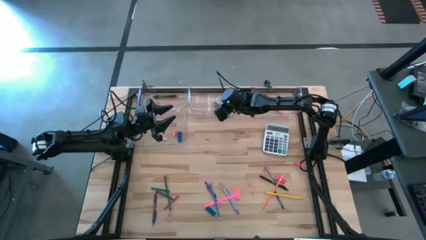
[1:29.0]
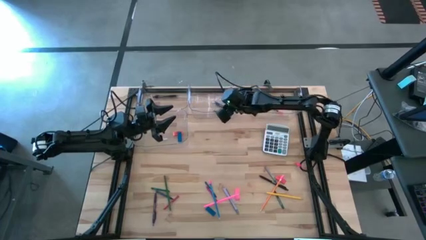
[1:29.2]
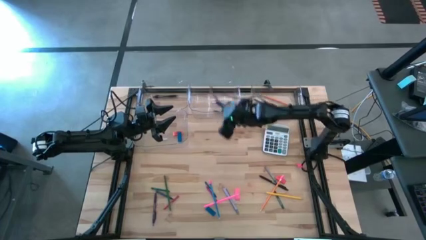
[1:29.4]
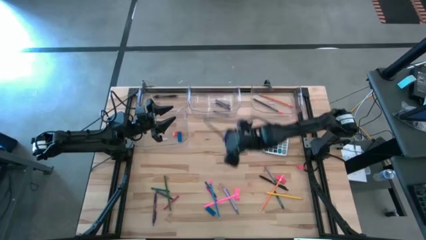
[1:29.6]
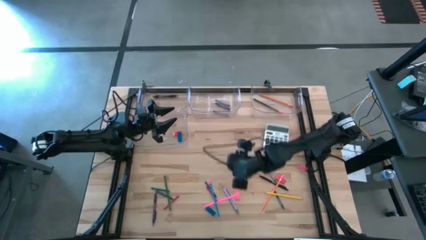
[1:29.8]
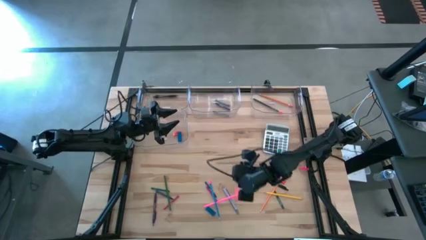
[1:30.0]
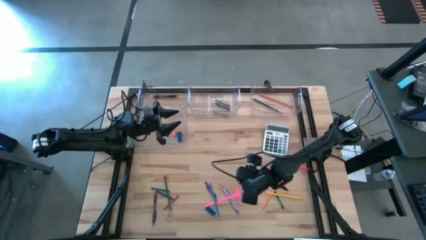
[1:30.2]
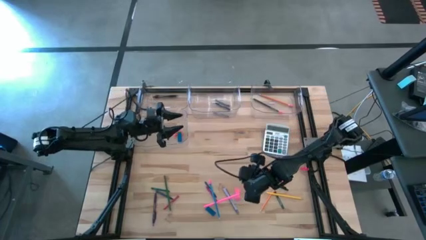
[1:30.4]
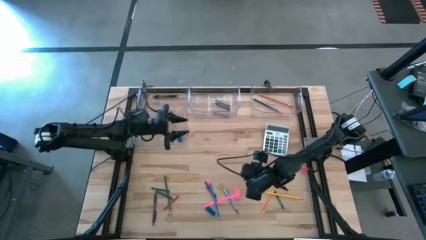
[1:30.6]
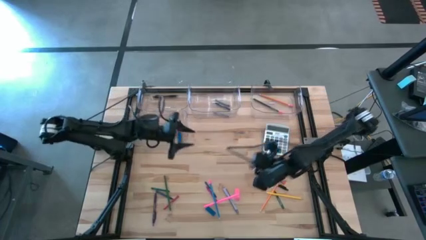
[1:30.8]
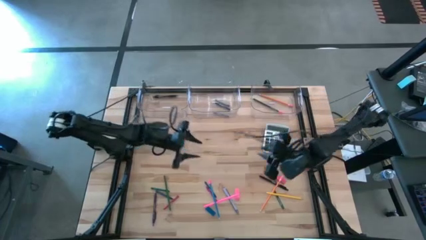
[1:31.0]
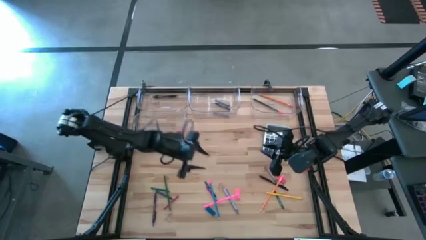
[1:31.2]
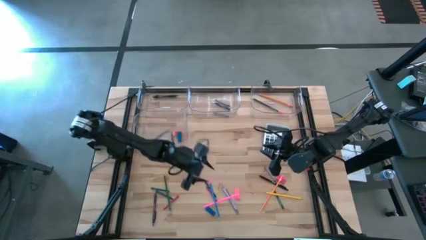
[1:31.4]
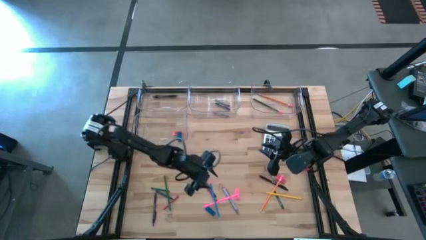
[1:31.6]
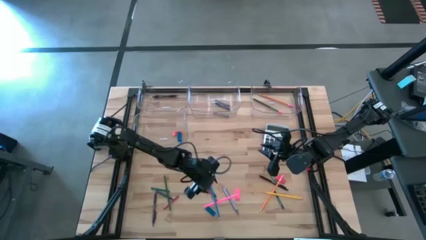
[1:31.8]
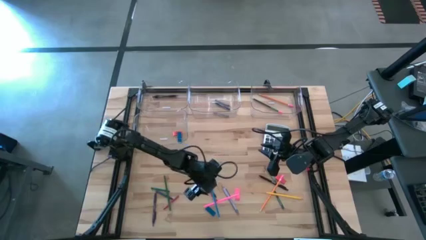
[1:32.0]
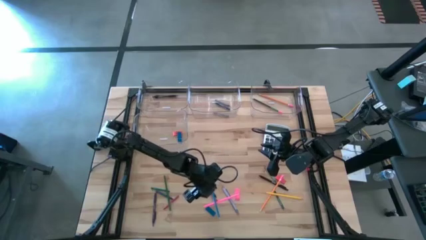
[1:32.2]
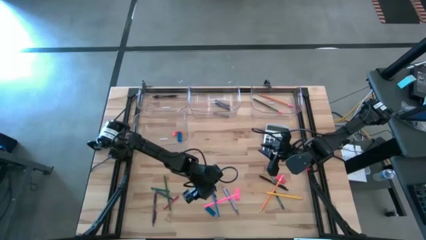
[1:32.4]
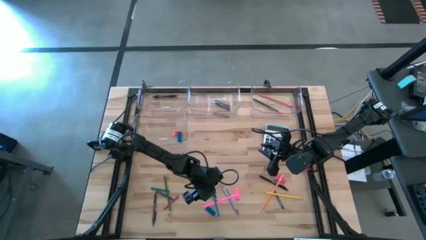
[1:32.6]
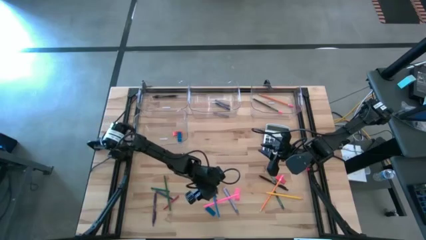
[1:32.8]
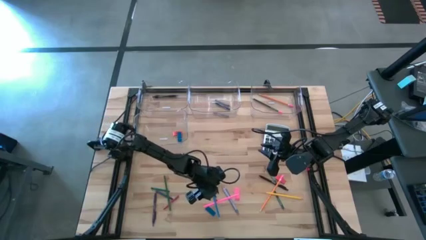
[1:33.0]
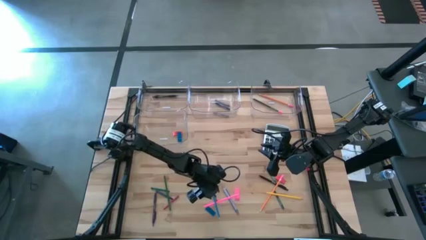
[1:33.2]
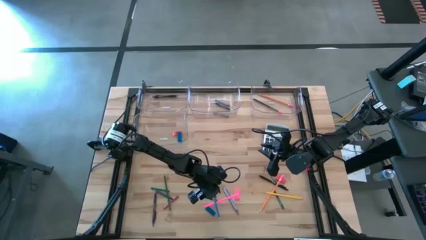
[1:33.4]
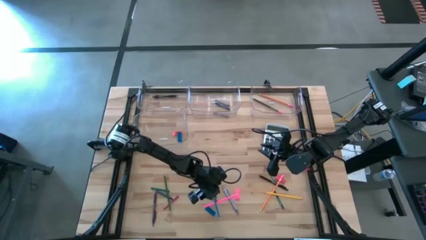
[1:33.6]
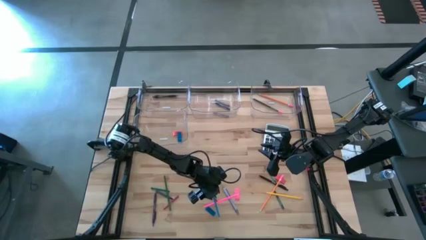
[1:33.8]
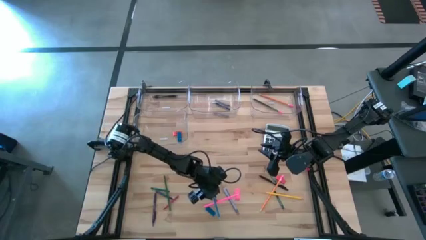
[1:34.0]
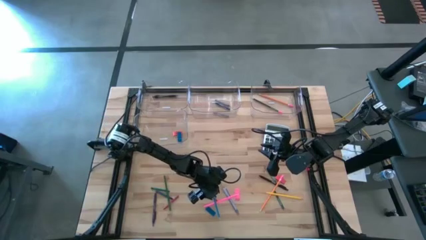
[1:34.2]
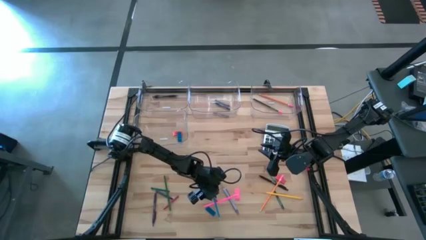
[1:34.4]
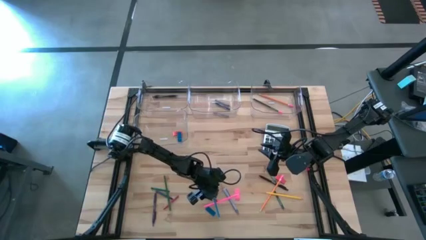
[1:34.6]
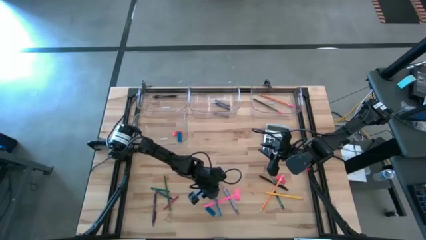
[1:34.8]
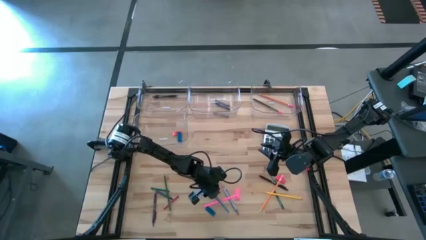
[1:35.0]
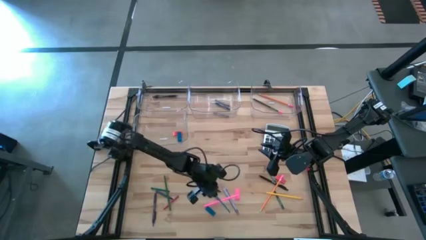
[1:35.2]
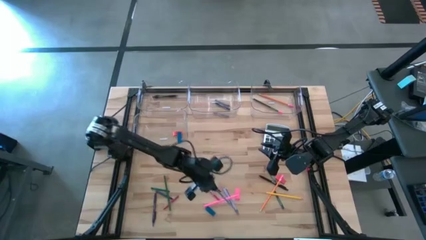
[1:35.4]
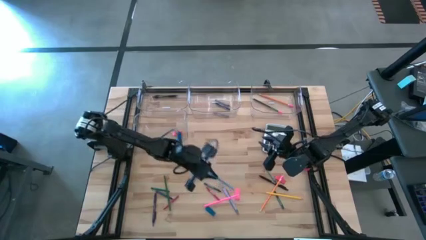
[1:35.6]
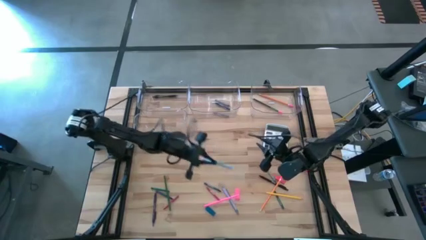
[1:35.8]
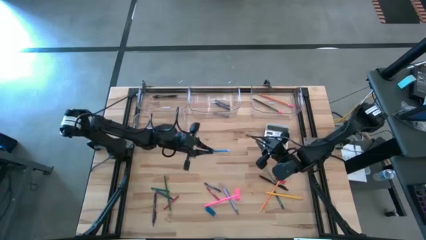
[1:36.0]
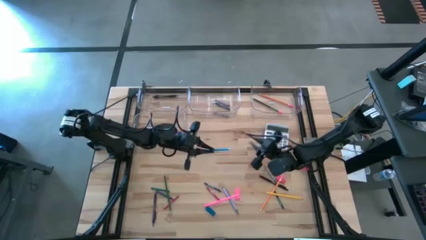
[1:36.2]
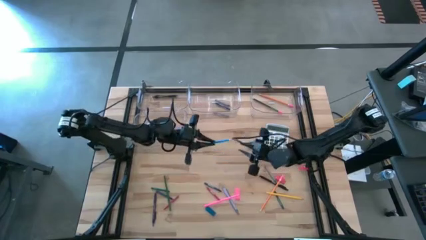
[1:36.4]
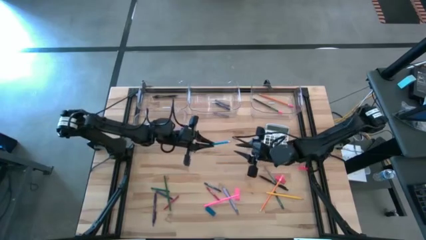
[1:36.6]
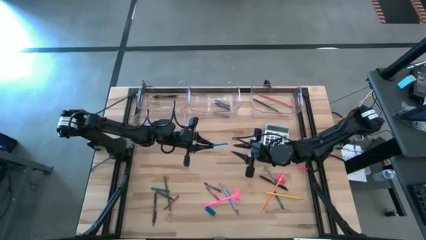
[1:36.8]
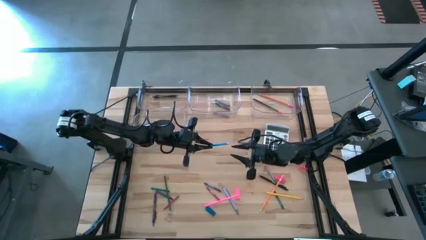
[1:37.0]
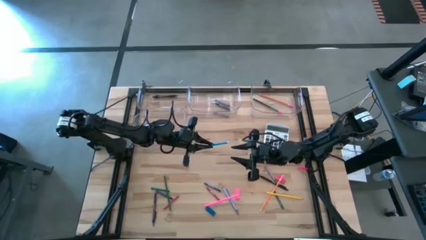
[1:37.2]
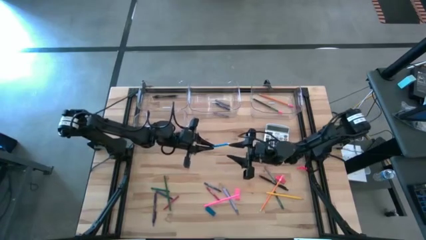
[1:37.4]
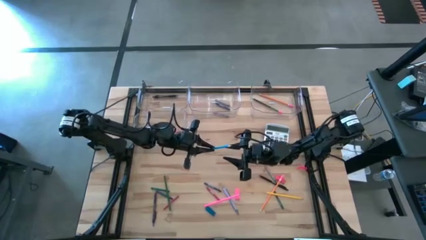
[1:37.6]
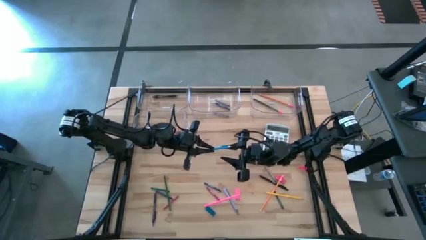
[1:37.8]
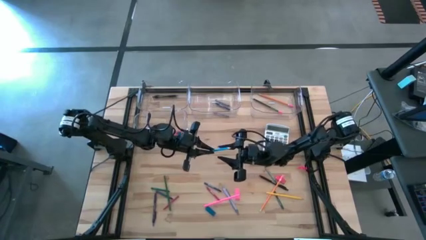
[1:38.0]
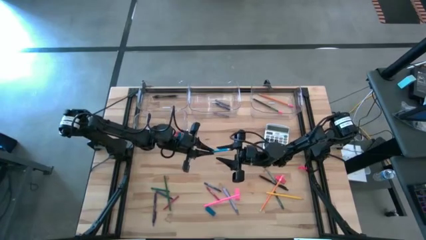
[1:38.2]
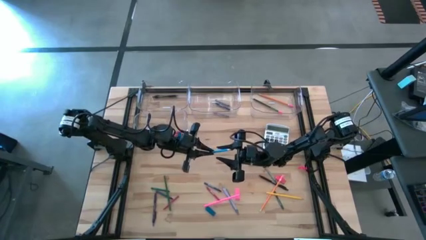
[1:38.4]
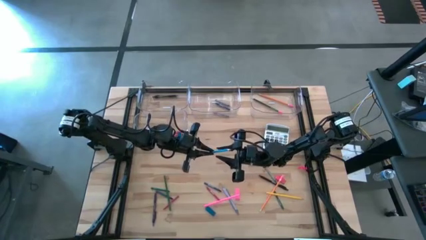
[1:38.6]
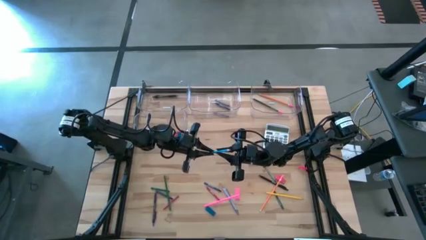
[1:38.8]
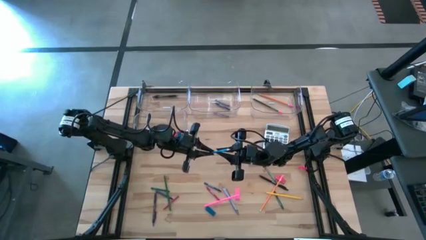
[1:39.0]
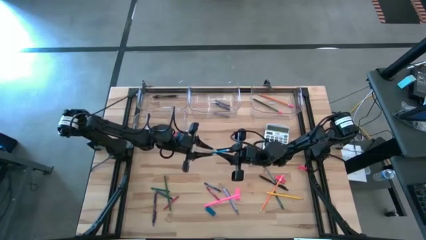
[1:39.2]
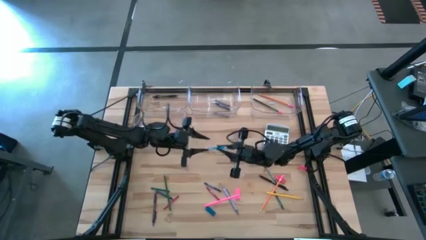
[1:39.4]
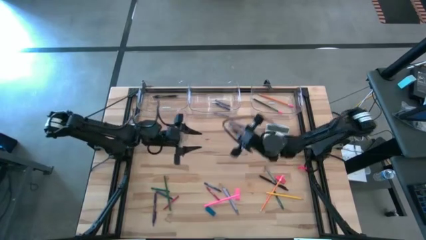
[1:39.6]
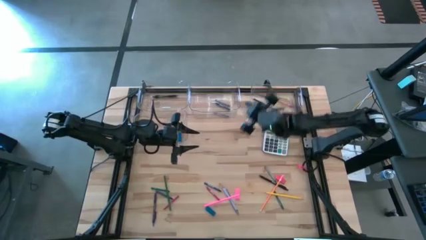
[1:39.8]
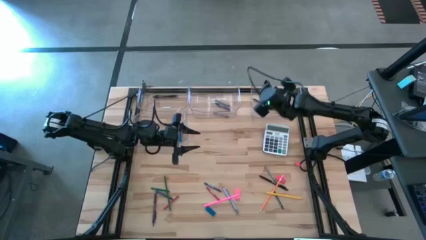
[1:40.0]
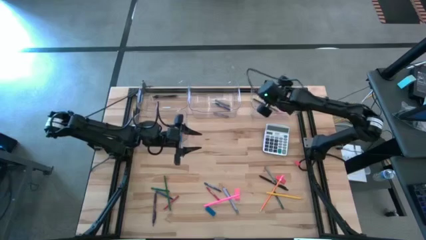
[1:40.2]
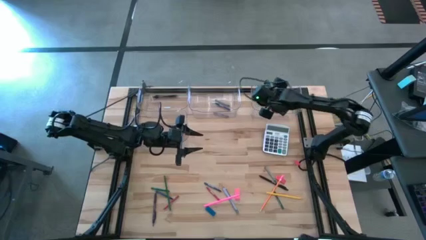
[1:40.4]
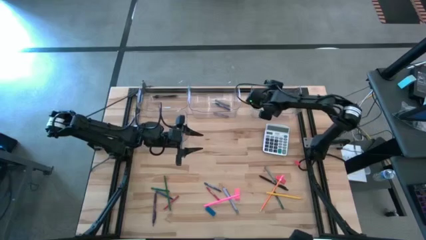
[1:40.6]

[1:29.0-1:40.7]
Task: Sort crayons/erasers/pens/pencils in bins
Put the light blue pencil into the top right transparent bin

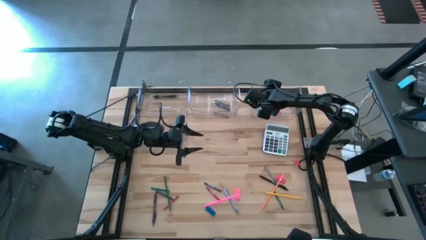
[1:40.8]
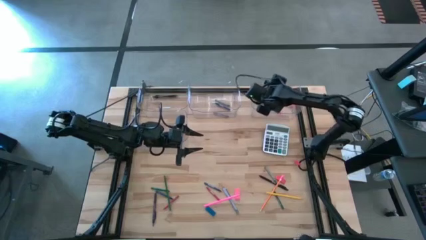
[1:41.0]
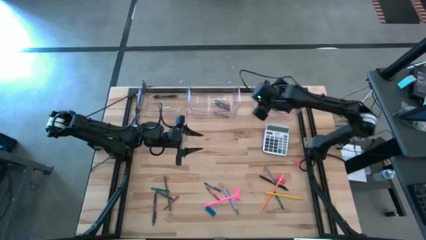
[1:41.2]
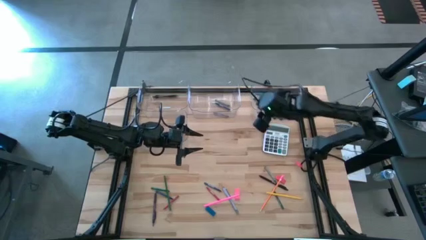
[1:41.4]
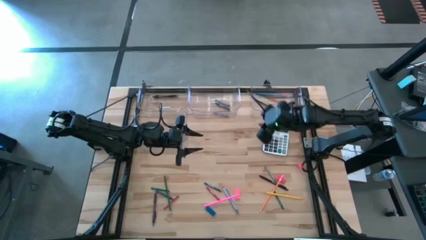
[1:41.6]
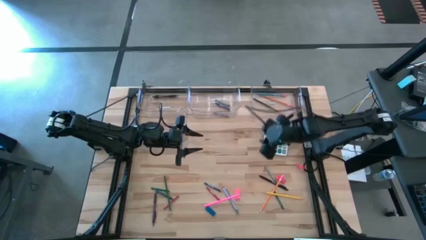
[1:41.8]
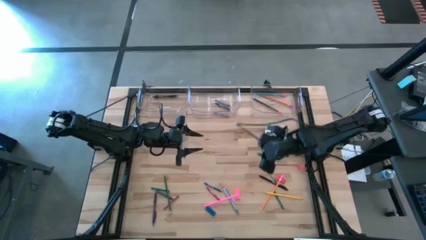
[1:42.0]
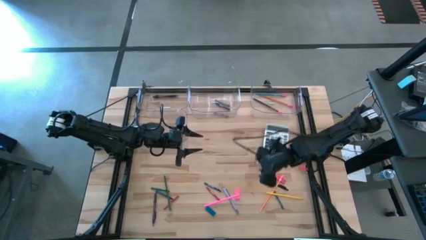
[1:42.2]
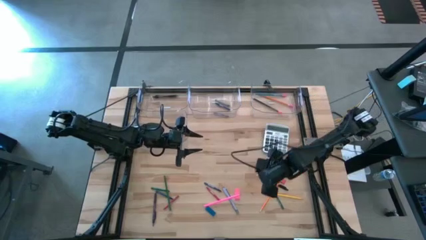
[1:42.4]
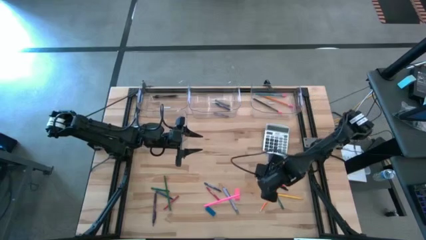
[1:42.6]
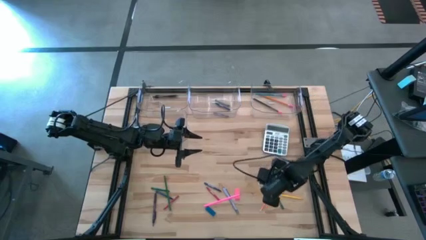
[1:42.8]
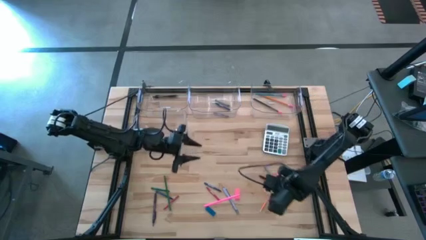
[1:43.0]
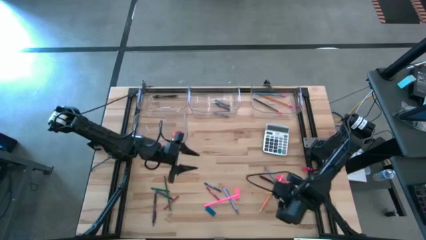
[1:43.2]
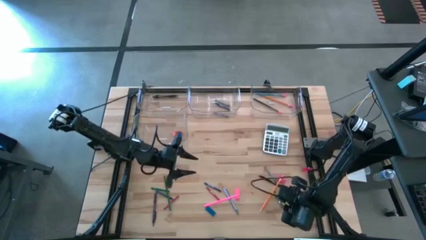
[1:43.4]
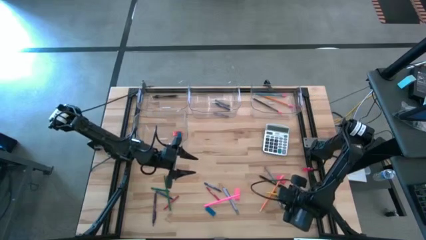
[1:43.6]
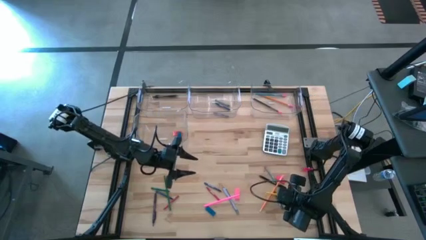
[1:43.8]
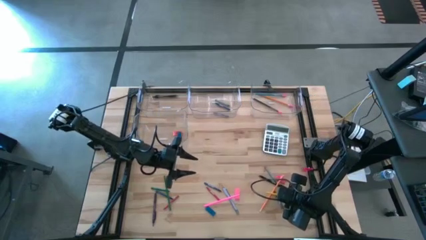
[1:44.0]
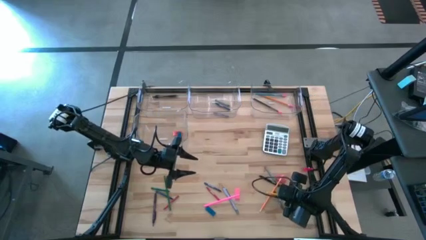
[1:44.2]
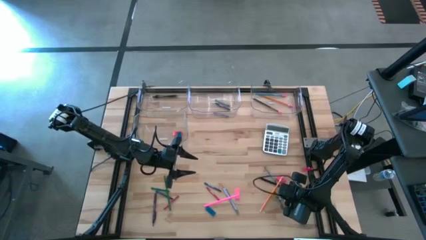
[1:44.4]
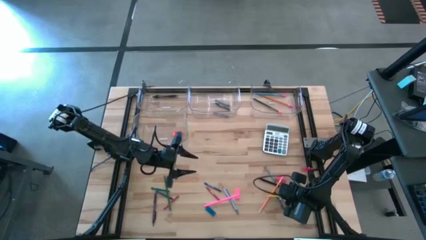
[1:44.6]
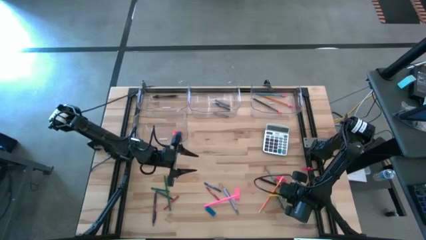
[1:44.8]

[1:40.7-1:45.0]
Put the yellow pencil into the top right transparent bin

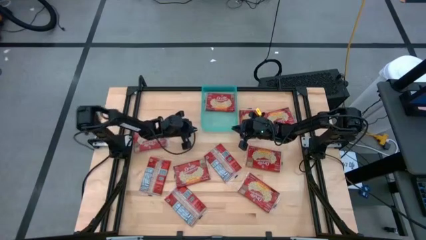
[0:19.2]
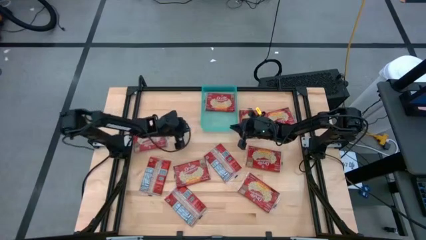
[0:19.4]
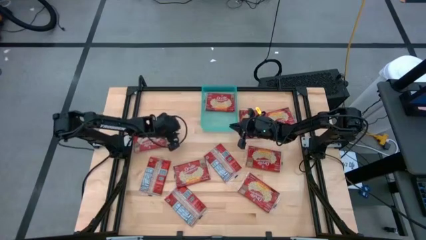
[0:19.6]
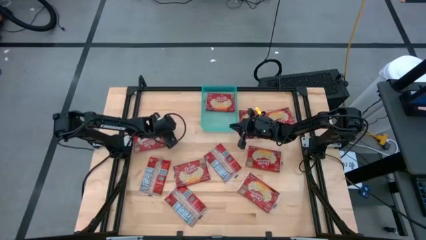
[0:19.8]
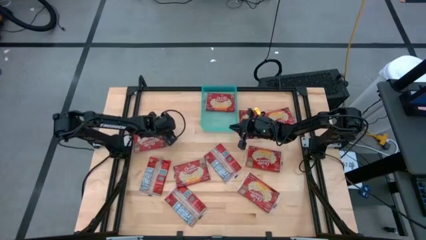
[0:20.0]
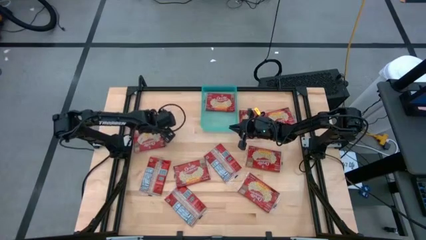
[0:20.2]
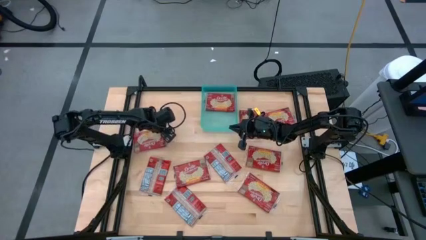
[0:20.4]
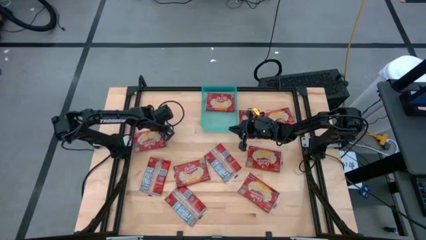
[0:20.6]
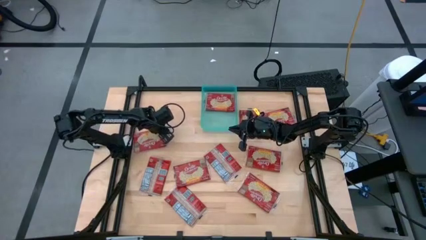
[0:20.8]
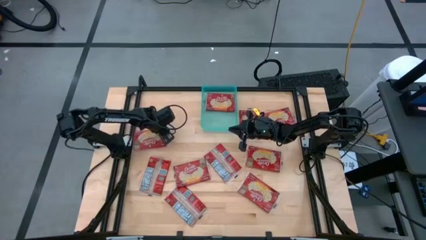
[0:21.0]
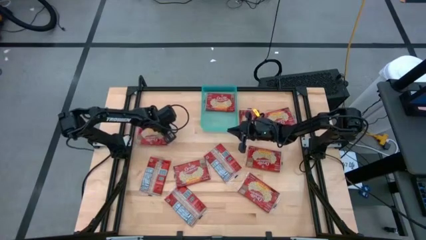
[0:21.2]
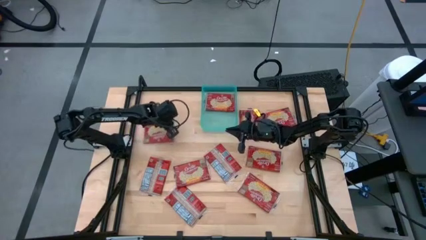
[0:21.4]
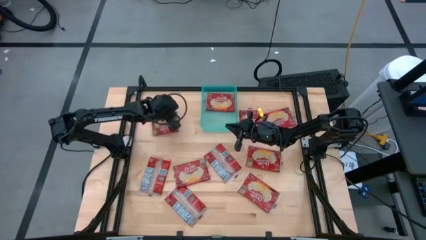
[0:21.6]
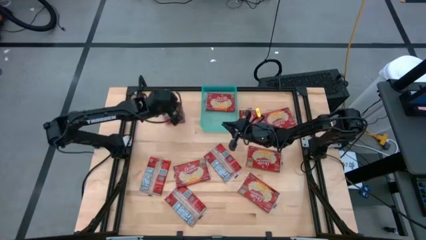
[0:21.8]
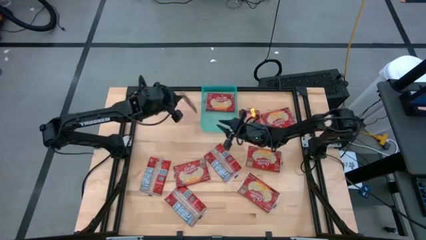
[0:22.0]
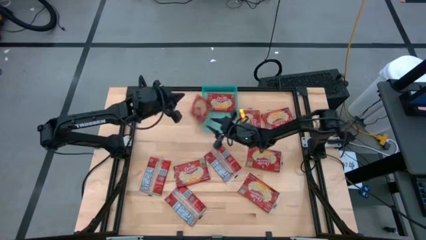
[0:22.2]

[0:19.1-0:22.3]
Task: Sort popcorn bags into baskets
Put the red popcorn bag into the blue bin
